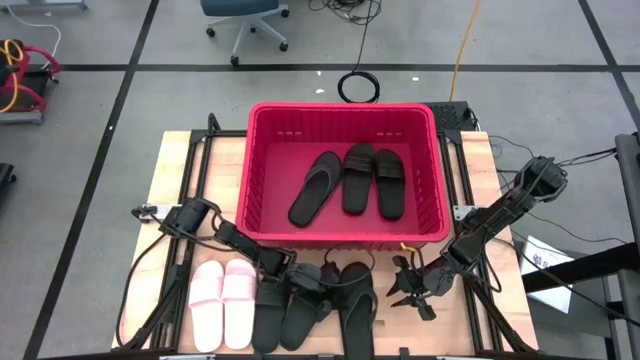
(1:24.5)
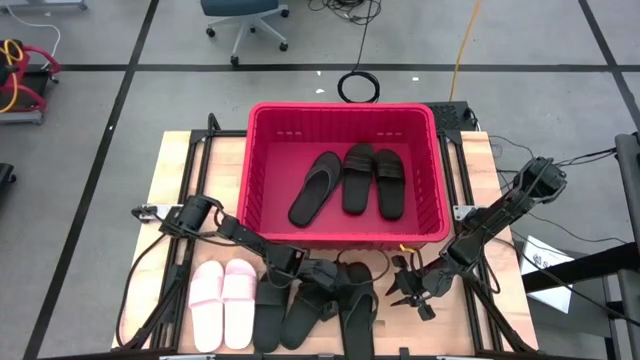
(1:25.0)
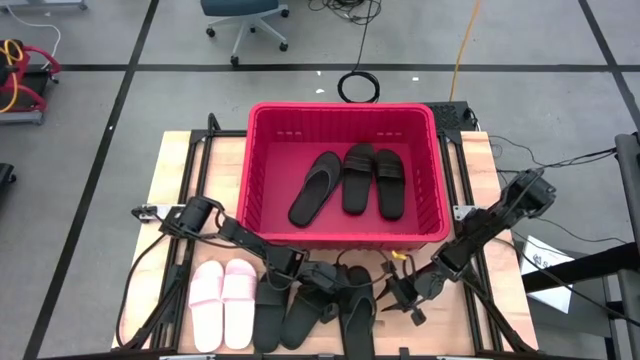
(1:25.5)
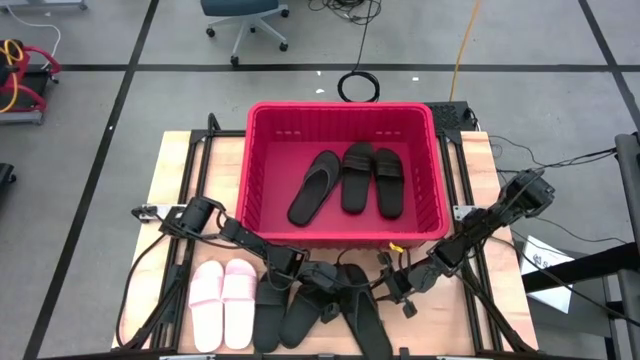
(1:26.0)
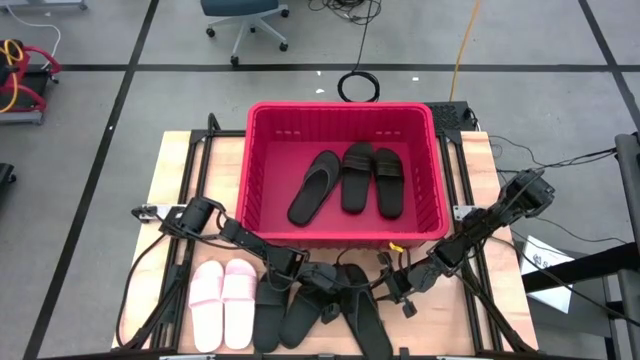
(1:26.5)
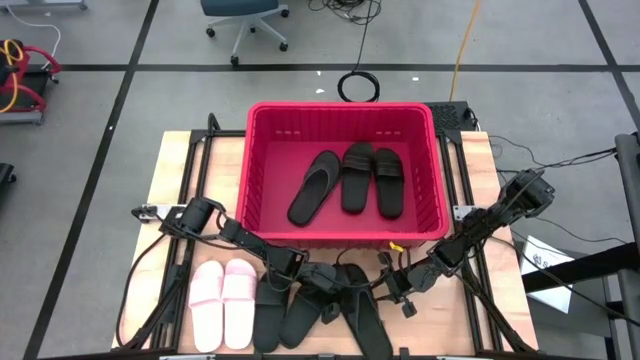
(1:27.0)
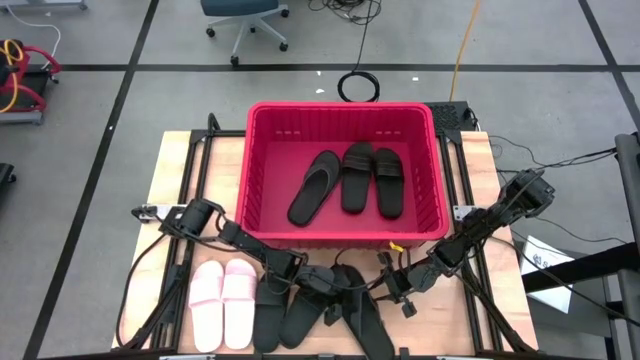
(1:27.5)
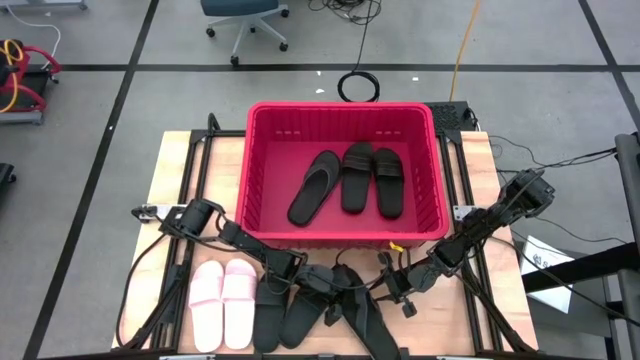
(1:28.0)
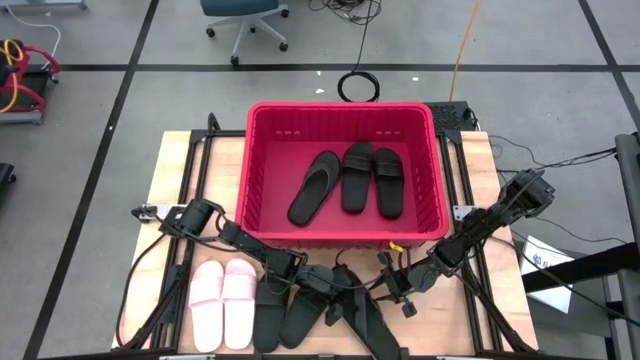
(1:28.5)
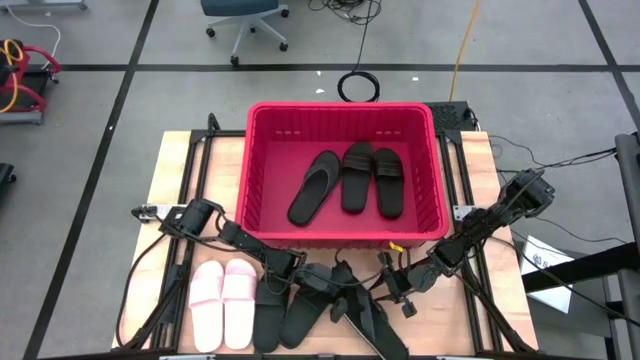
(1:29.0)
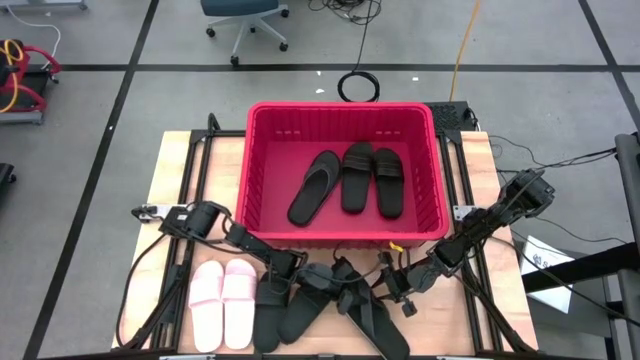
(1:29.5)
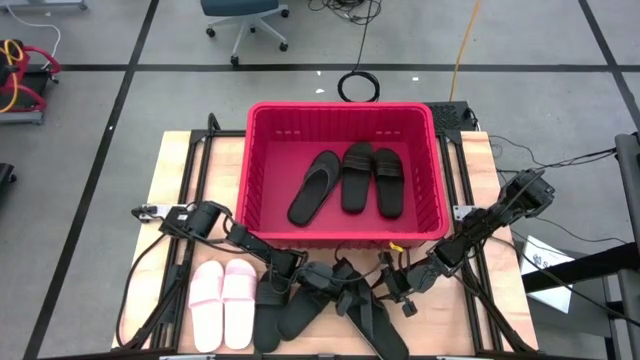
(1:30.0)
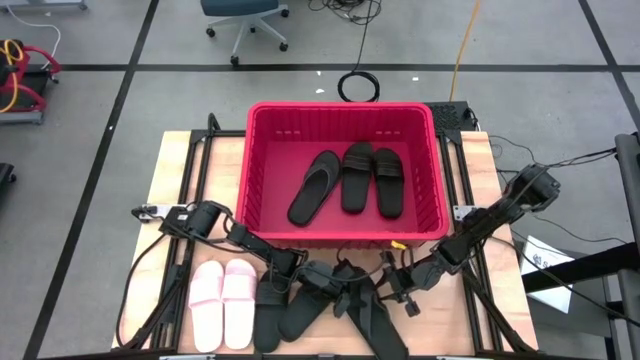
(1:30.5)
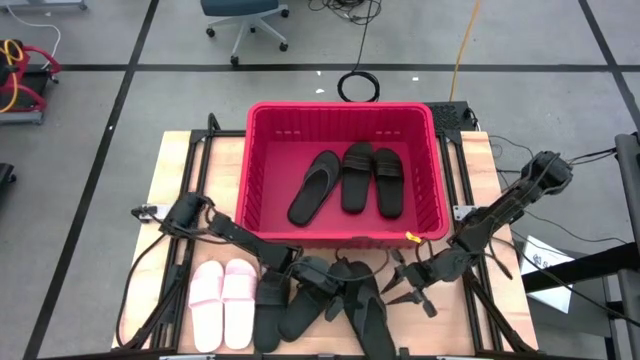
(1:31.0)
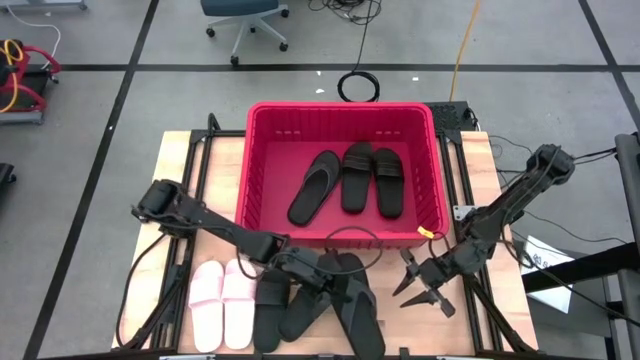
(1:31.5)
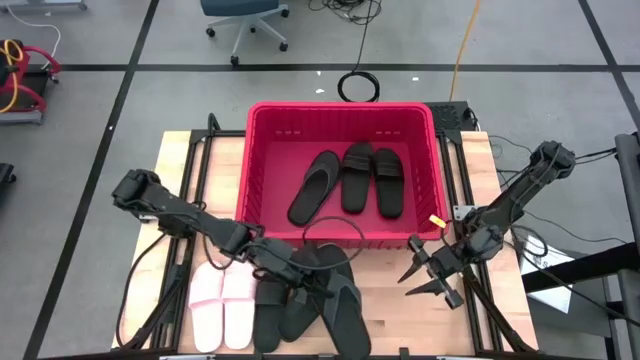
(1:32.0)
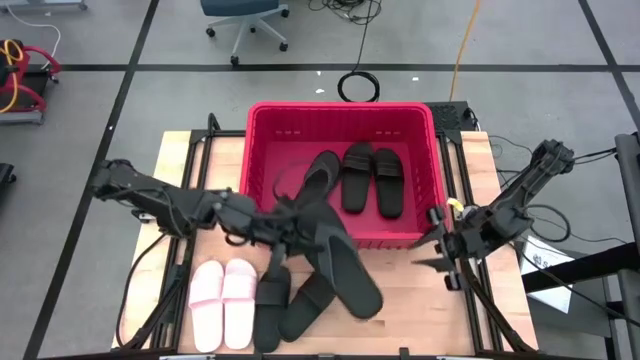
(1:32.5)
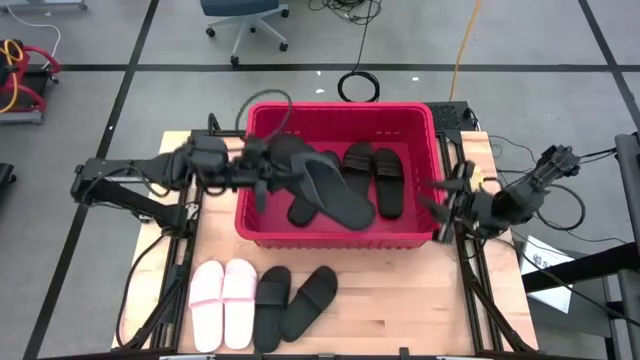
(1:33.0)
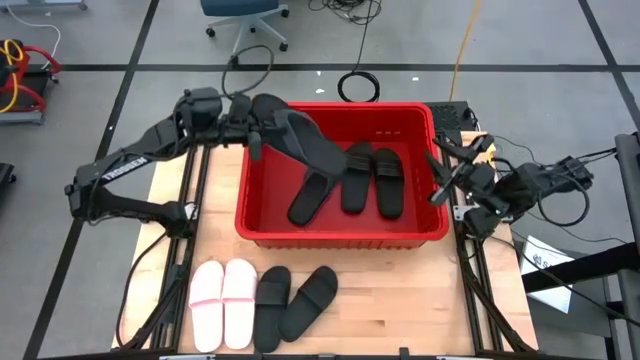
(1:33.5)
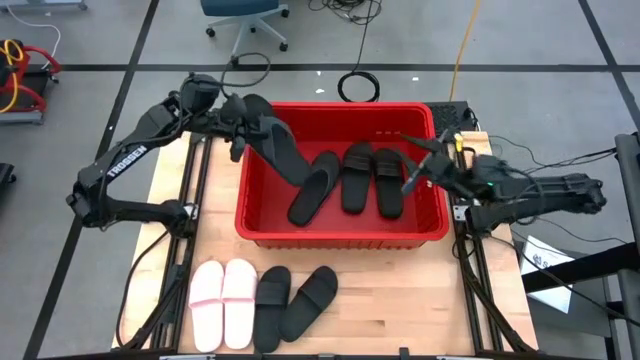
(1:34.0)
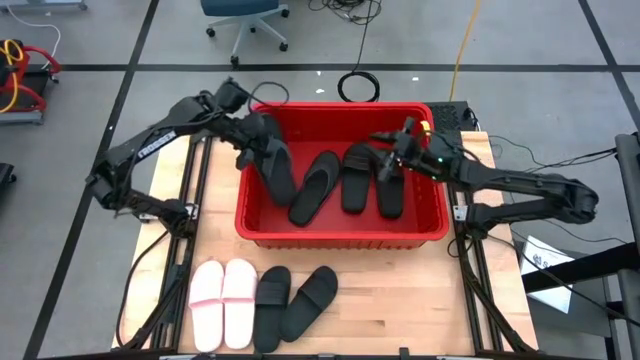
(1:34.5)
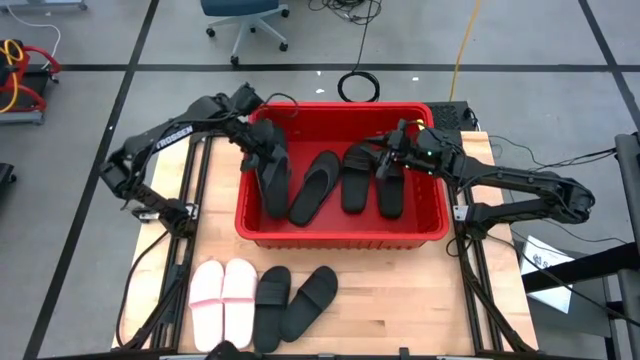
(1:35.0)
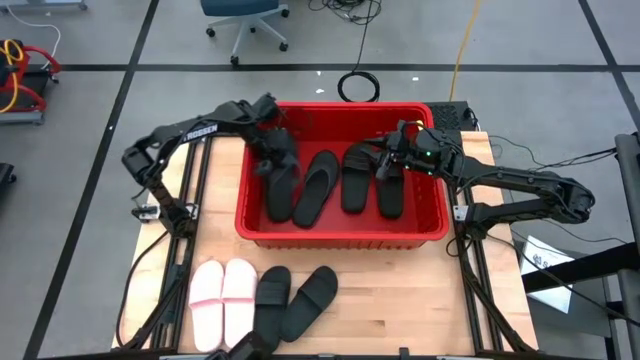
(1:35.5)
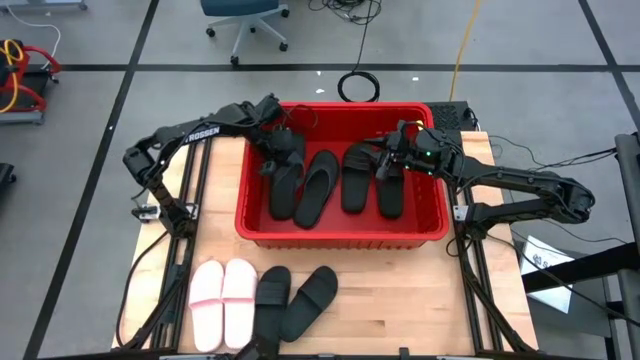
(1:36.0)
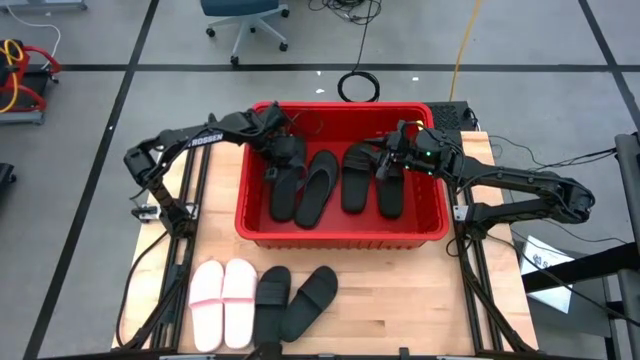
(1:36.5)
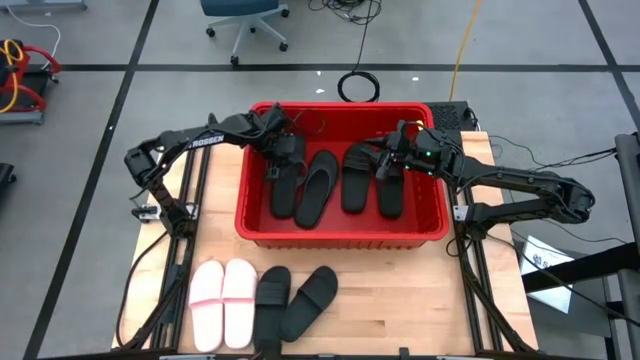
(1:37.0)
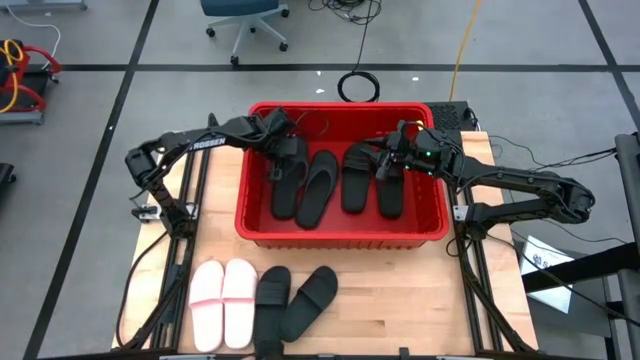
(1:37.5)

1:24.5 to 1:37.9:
Task: Pick and place slides into bin
Put the black slipper into the red bin

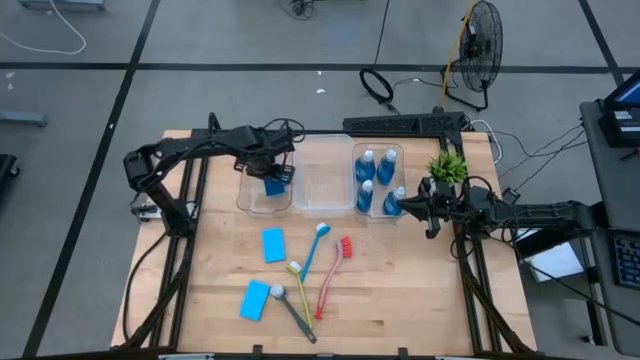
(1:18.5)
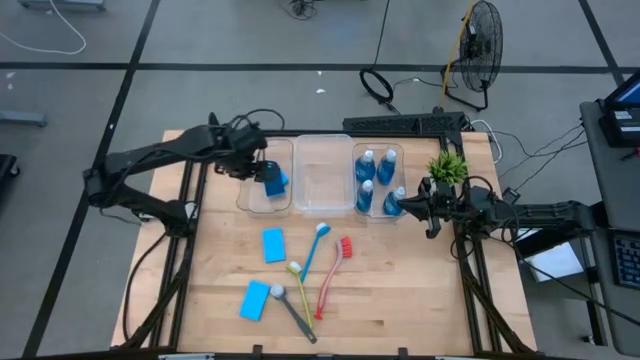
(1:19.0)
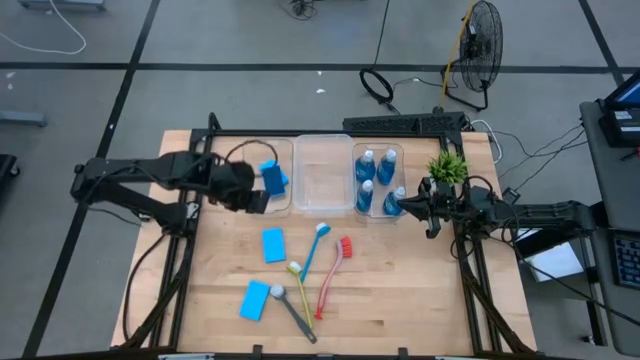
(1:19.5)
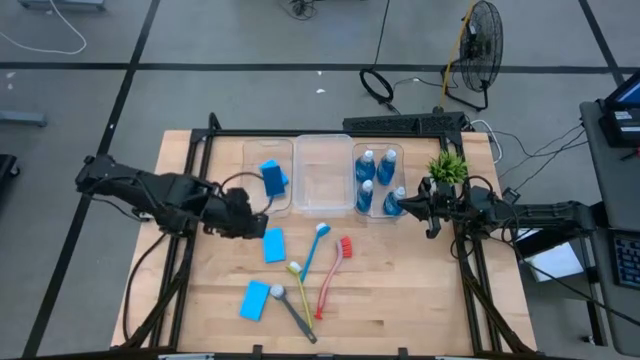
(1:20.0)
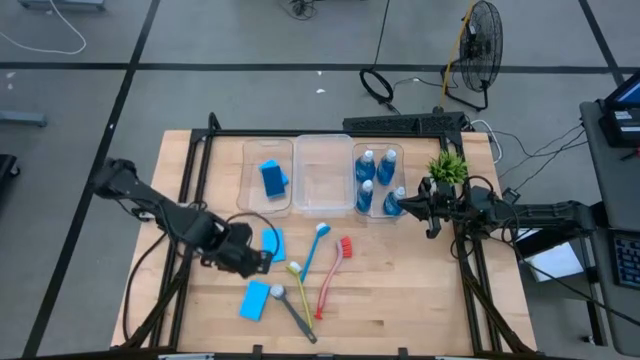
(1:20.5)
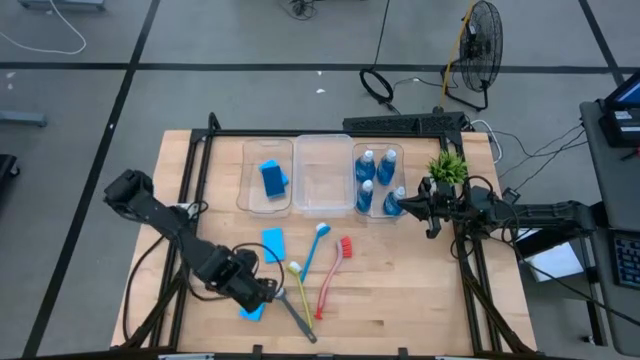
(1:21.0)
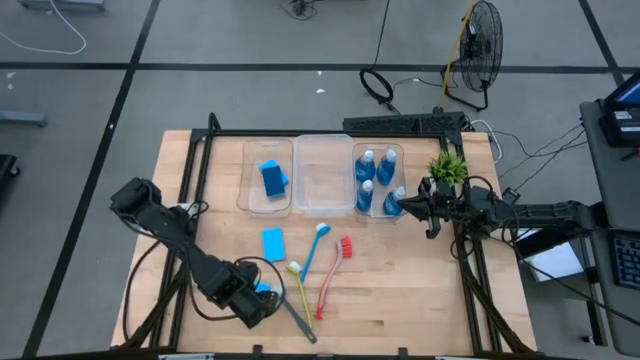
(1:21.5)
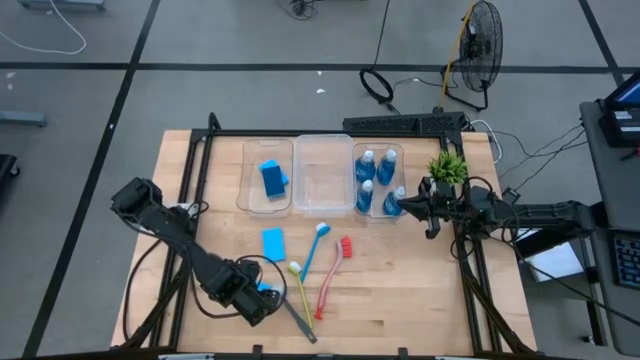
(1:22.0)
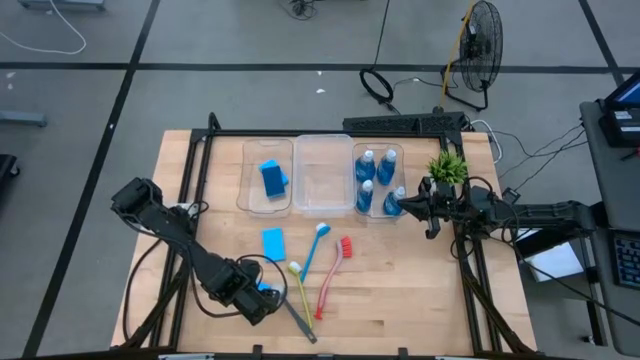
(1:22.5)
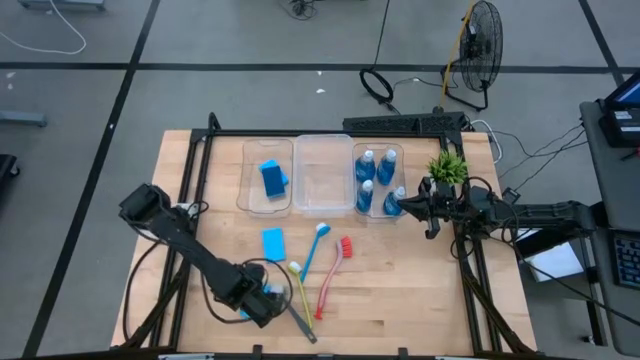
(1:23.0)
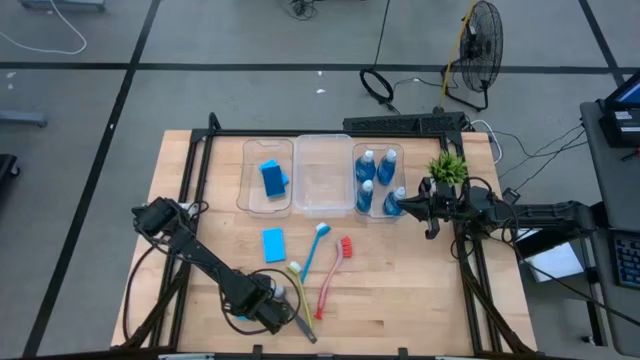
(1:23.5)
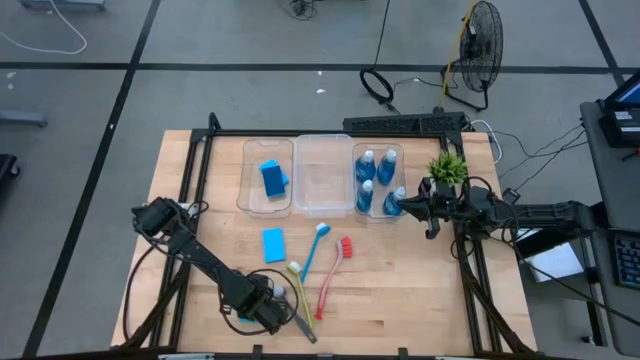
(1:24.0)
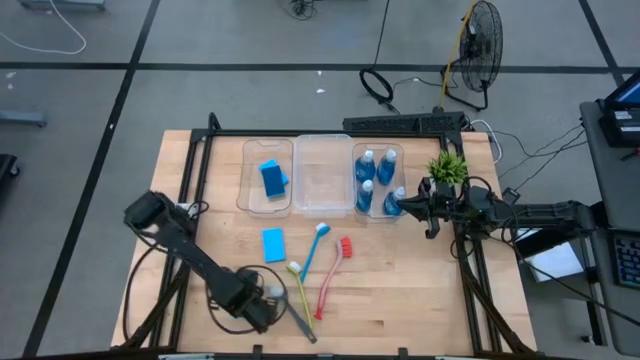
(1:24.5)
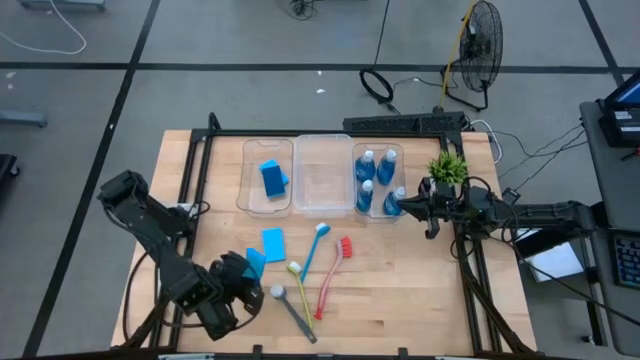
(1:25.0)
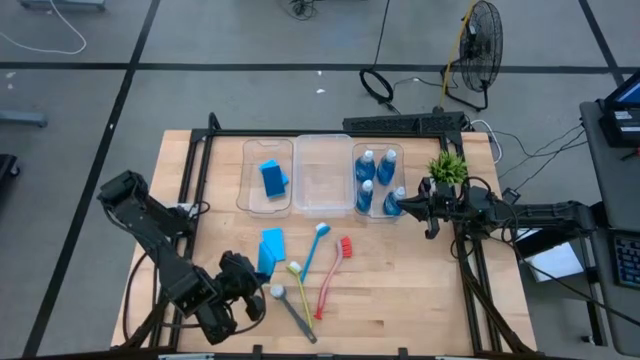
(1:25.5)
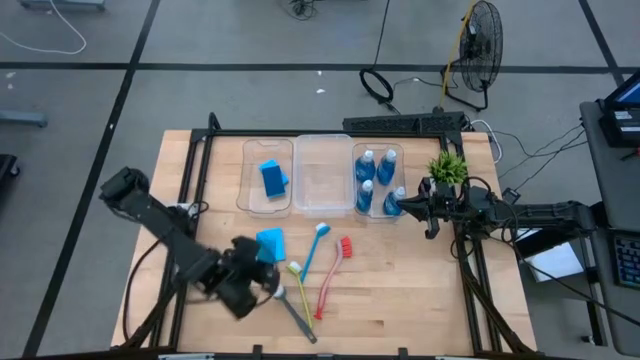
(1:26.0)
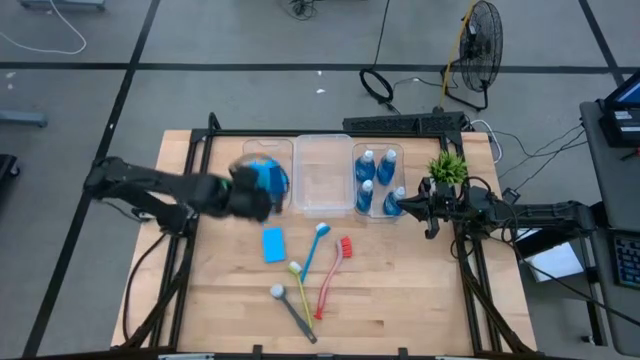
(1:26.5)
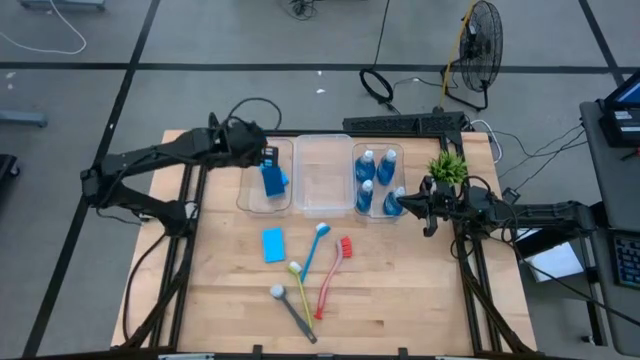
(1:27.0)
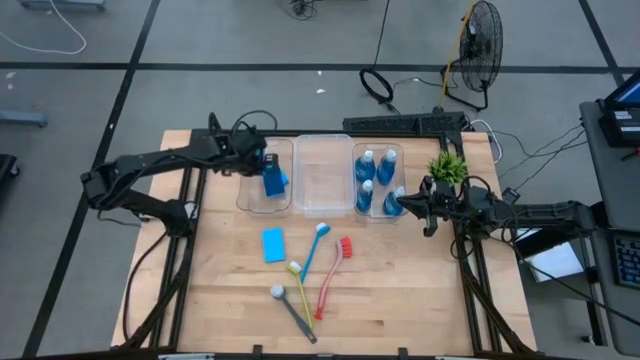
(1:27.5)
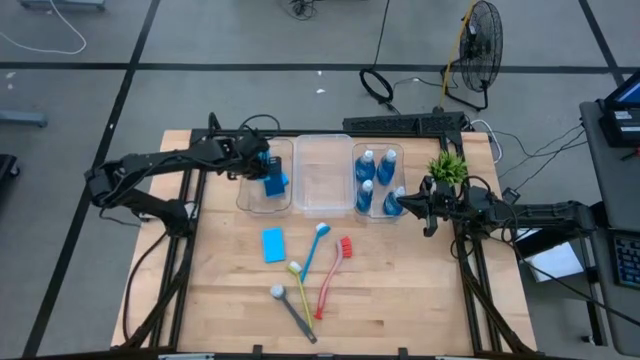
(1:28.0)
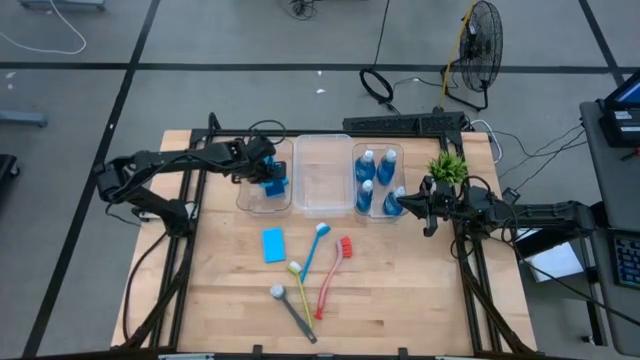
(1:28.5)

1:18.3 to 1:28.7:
Task: Pick & Place Kitchen Sink Supplies
Put the blue sponge wipe into the left transparent bin
